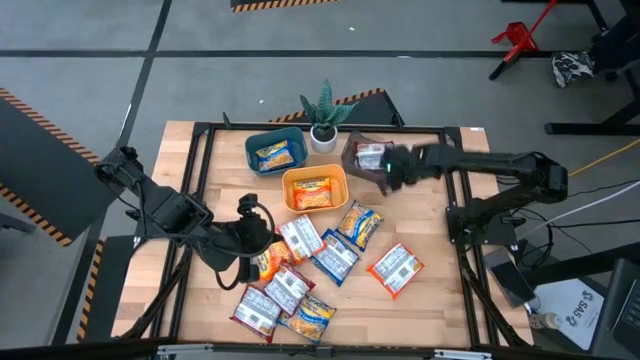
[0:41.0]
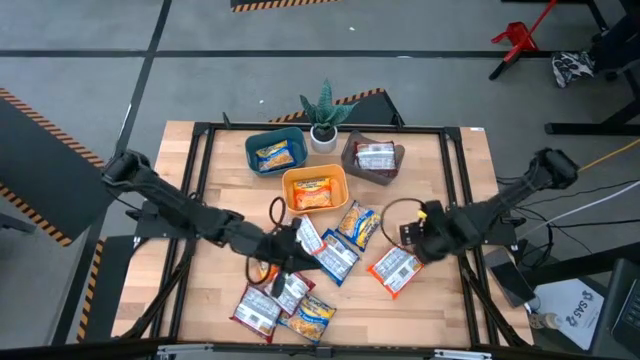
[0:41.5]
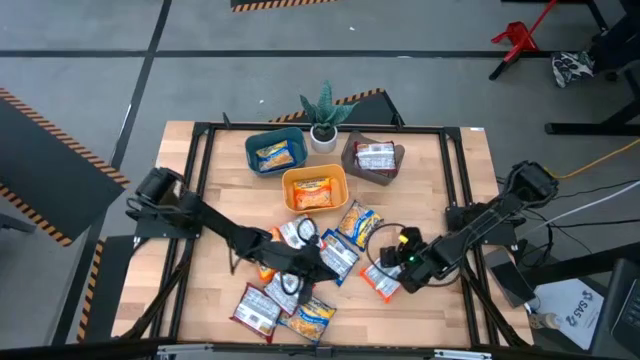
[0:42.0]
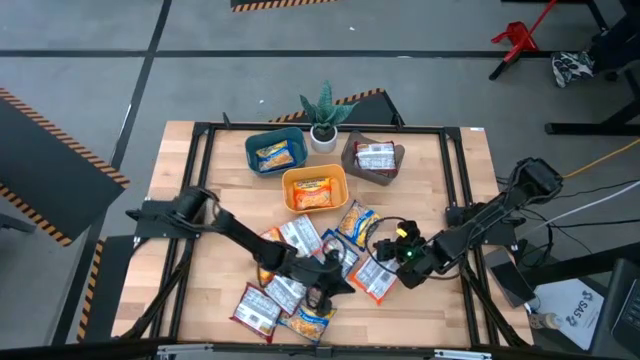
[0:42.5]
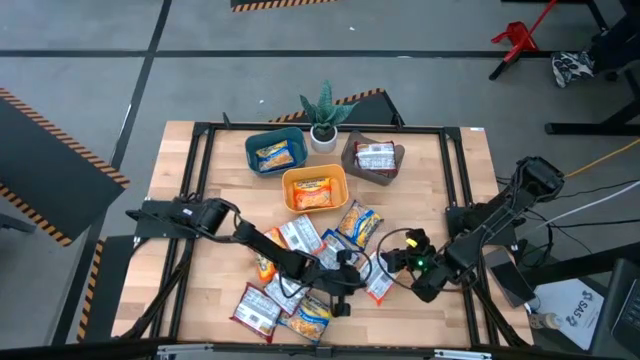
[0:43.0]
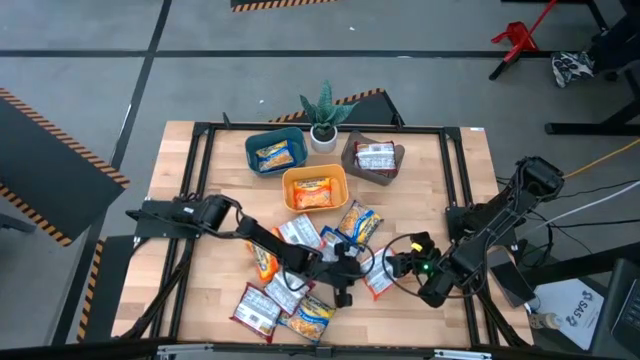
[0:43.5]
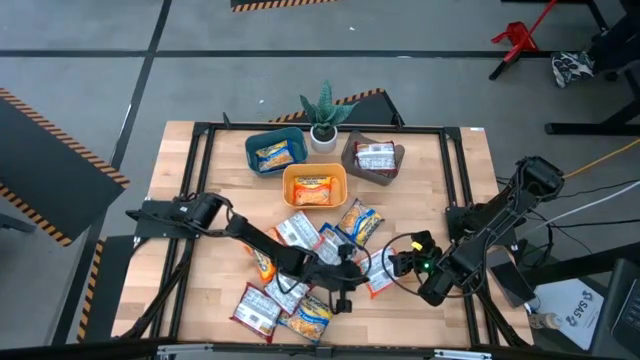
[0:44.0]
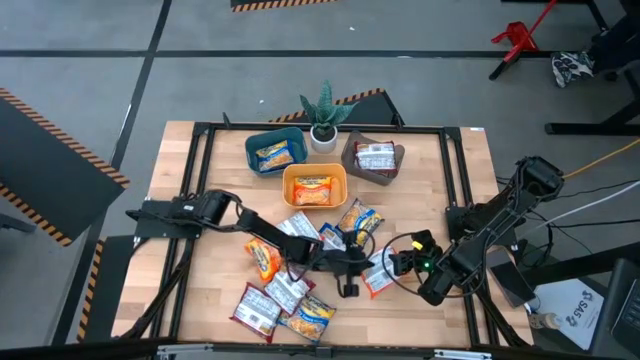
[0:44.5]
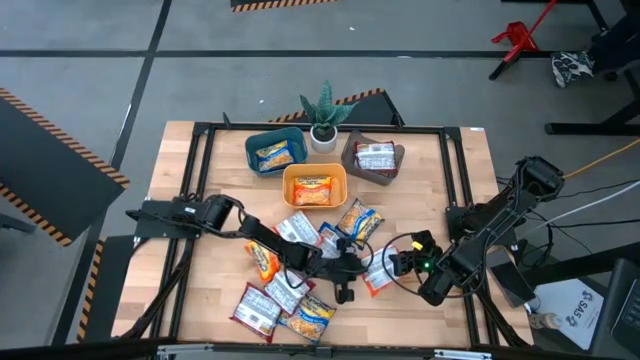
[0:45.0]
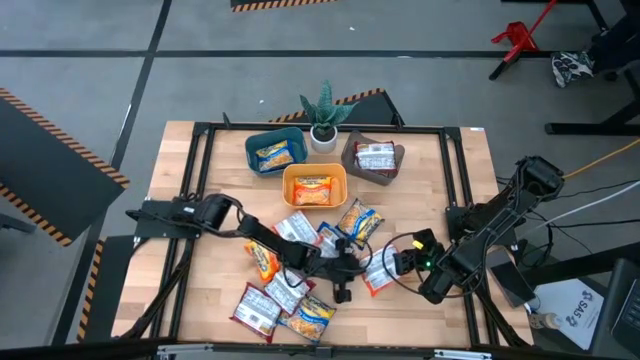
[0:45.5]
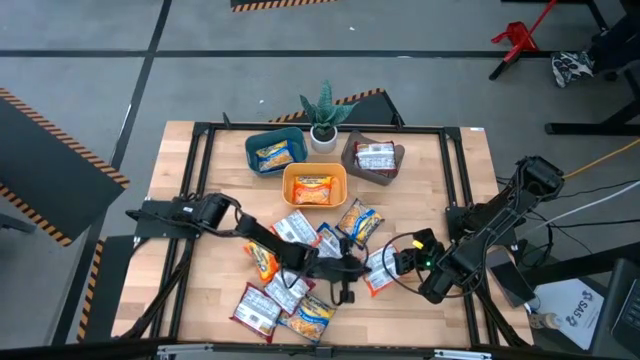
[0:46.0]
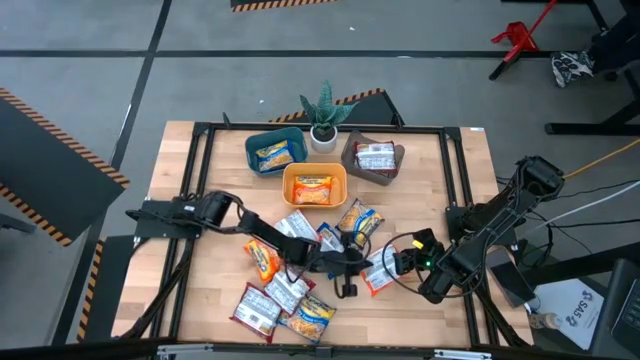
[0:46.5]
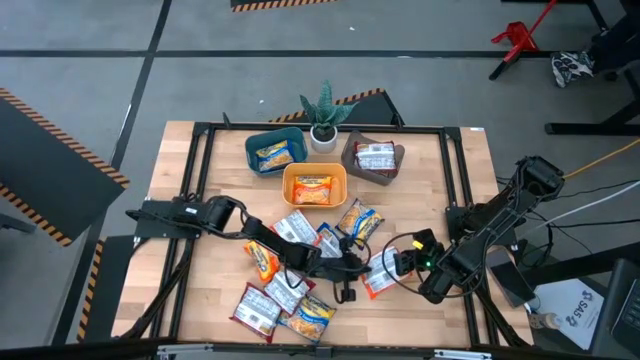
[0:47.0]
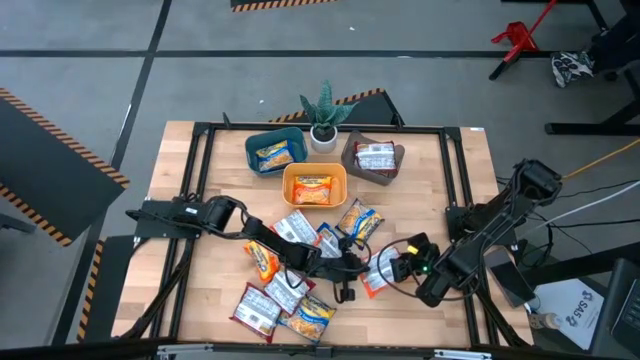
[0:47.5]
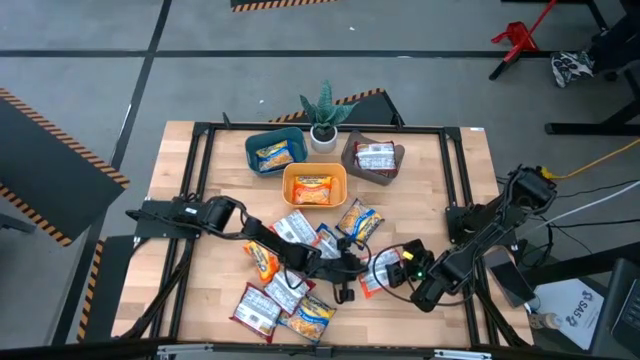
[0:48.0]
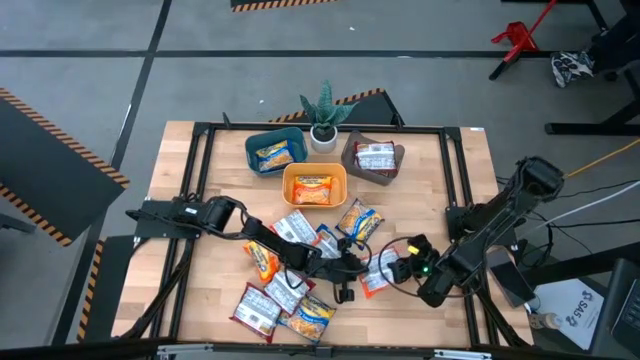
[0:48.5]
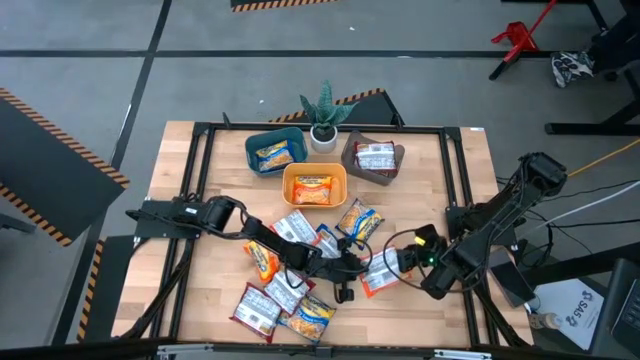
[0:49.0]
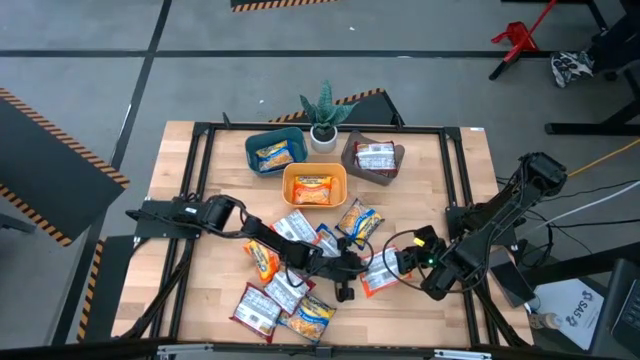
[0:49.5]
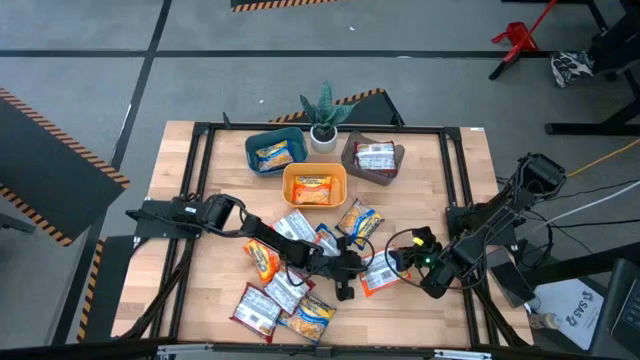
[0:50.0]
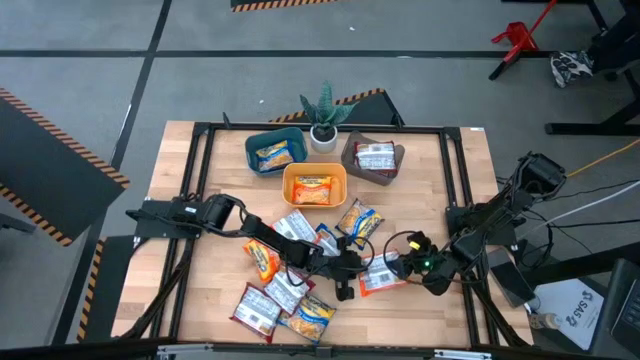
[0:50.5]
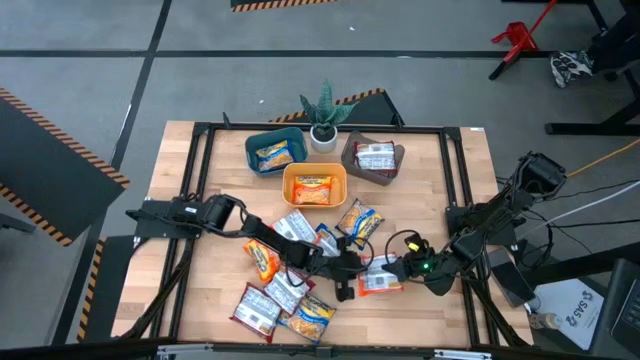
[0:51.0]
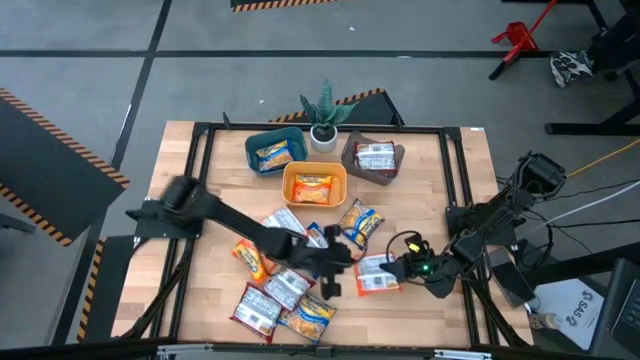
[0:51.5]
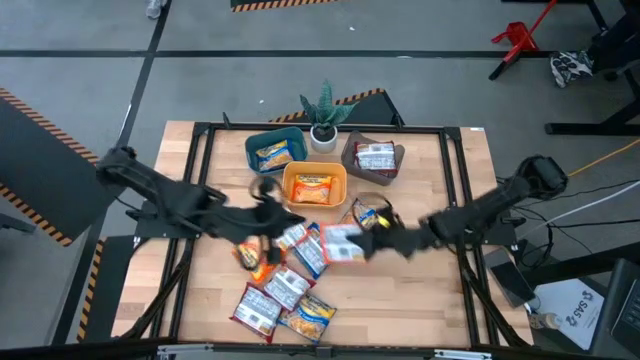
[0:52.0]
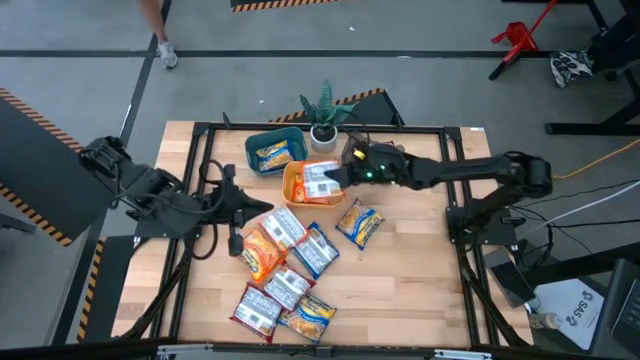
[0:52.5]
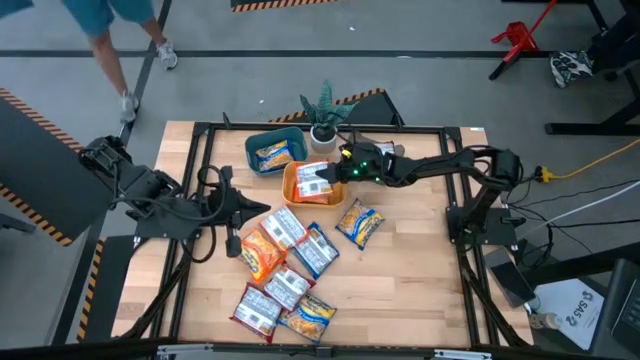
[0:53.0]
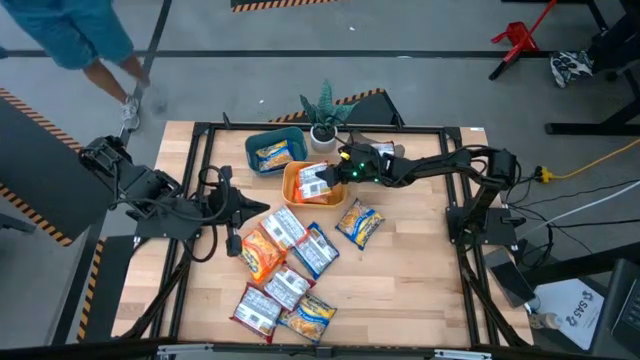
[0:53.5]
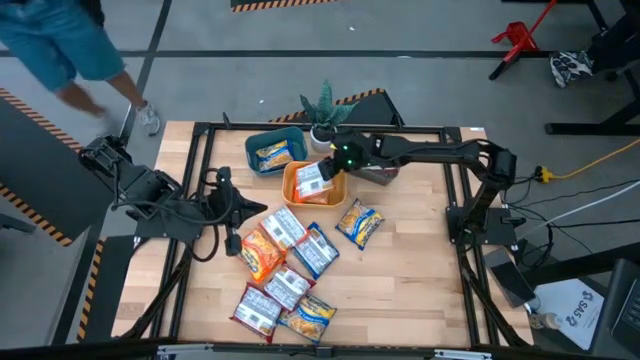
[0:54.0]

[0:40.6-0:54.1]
Task: Sort Maruchan noodles
Put the right orange noodle pack into the yellow bin

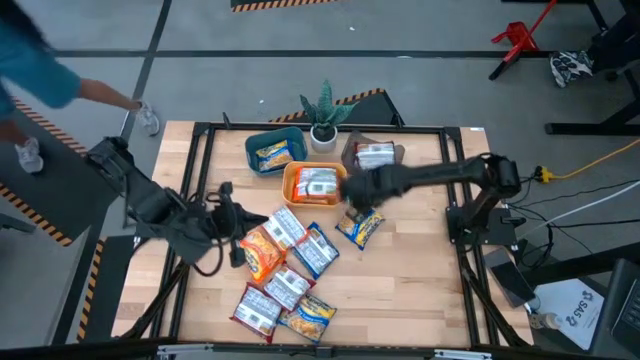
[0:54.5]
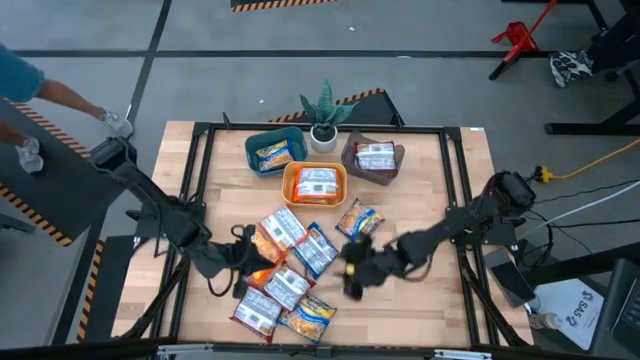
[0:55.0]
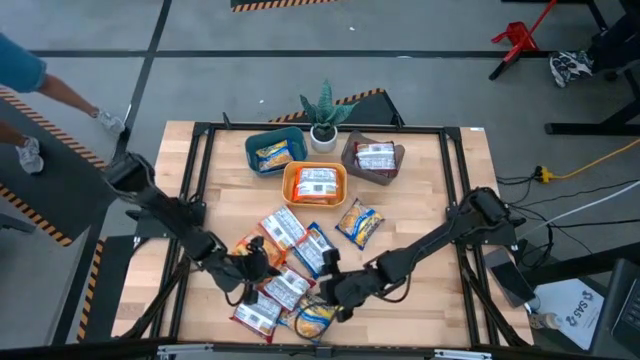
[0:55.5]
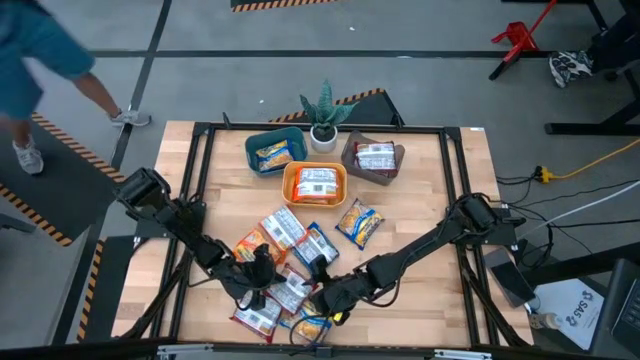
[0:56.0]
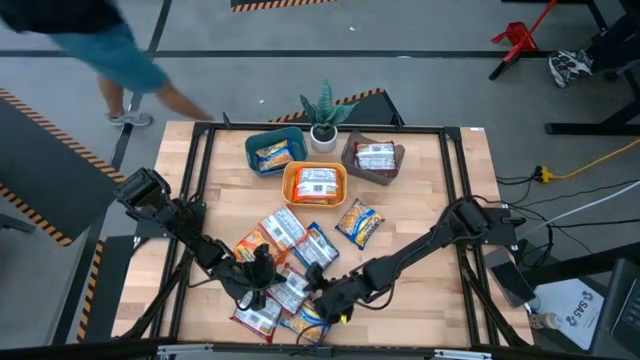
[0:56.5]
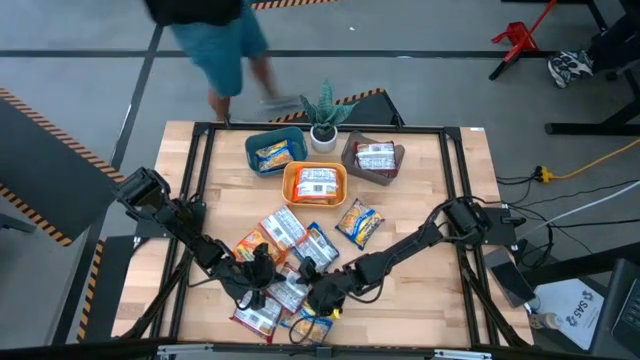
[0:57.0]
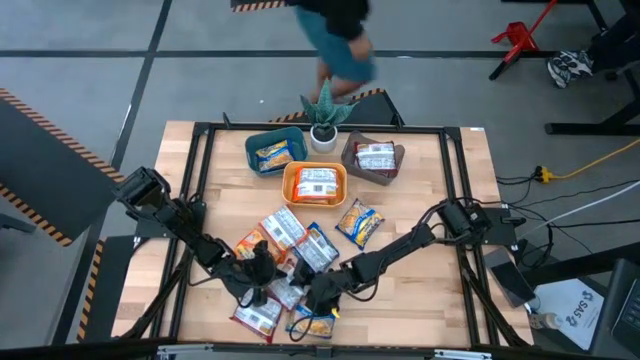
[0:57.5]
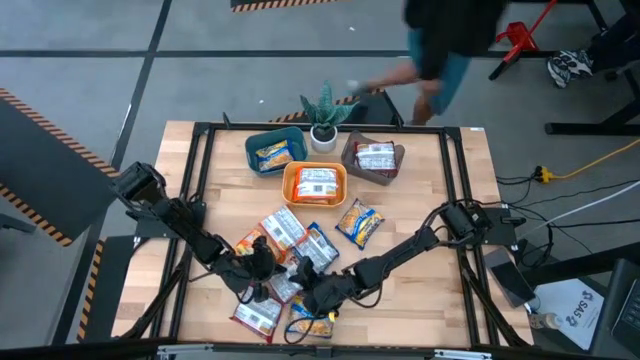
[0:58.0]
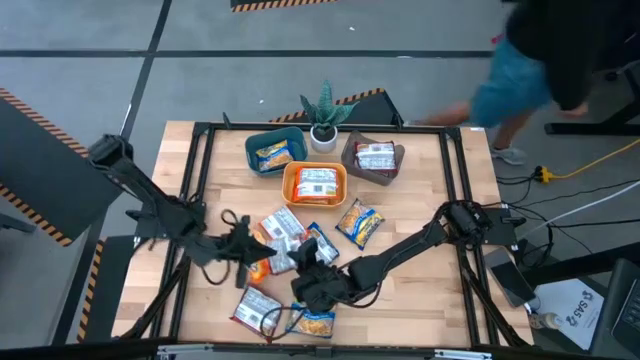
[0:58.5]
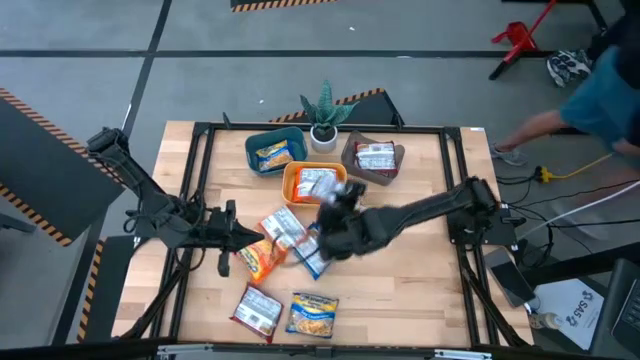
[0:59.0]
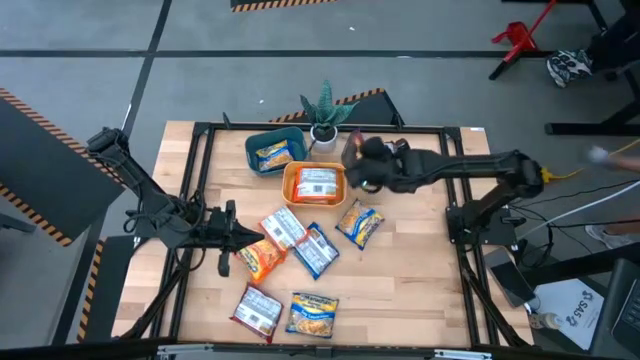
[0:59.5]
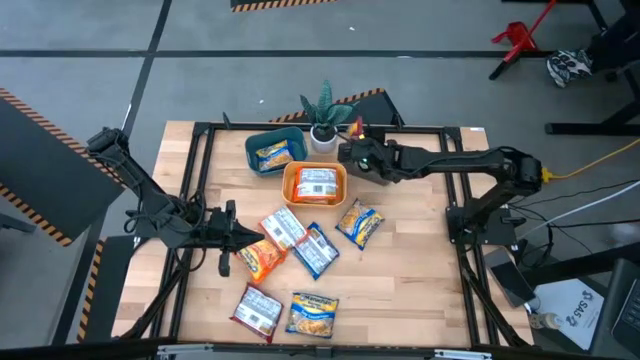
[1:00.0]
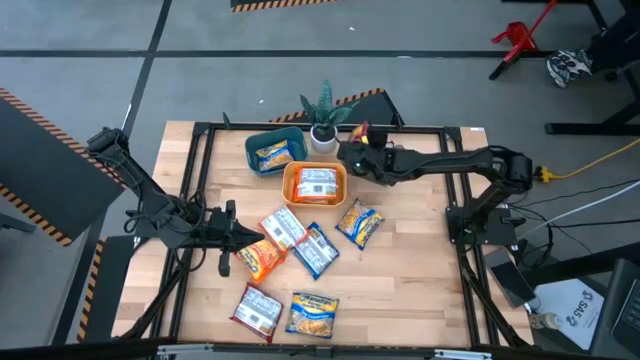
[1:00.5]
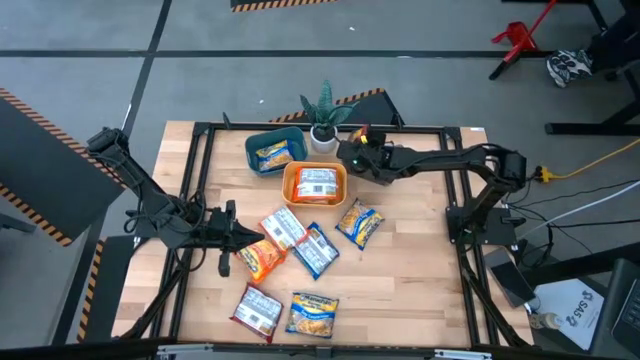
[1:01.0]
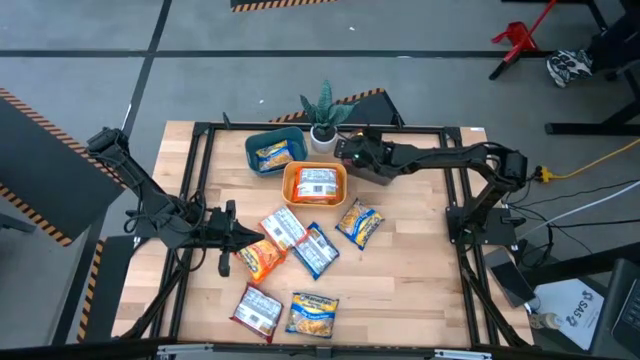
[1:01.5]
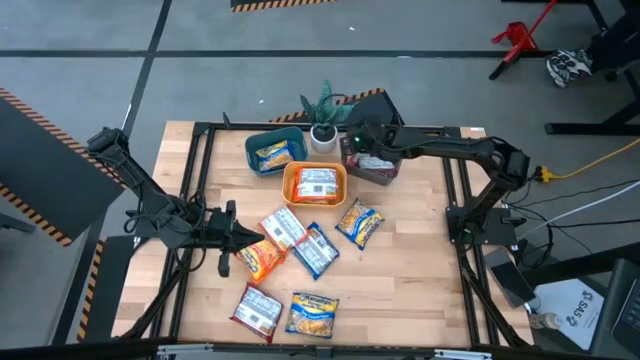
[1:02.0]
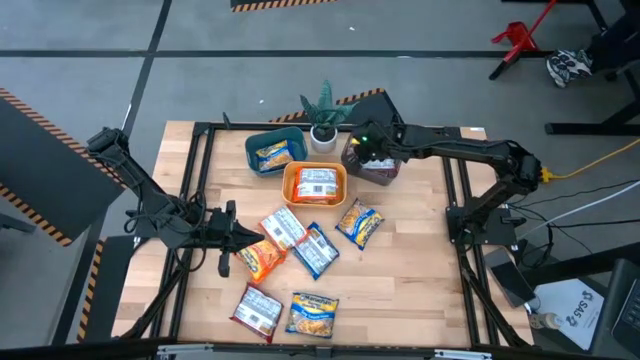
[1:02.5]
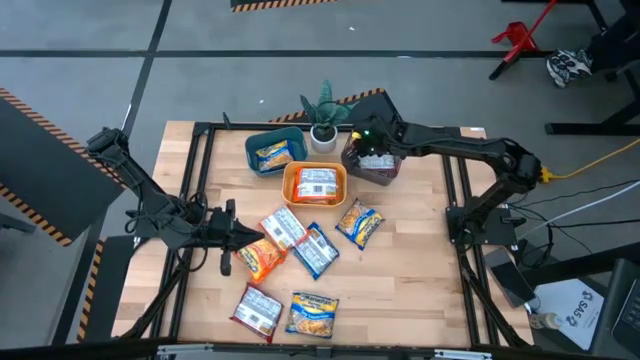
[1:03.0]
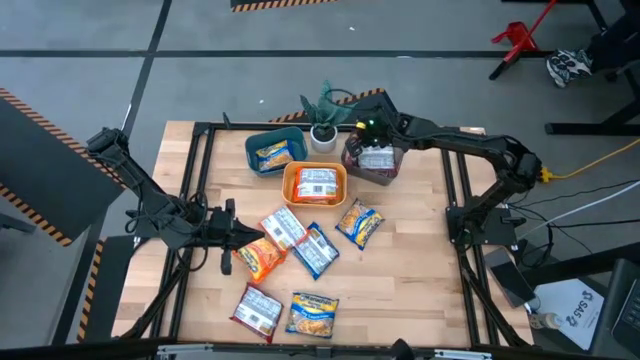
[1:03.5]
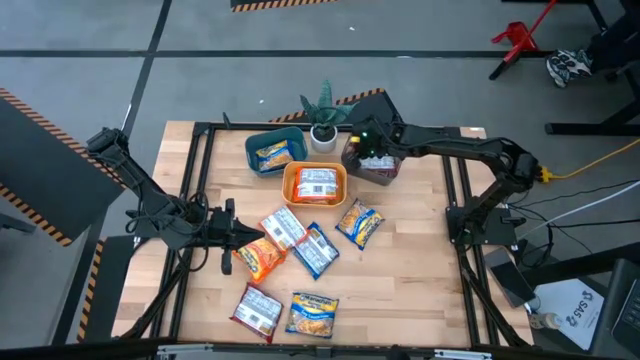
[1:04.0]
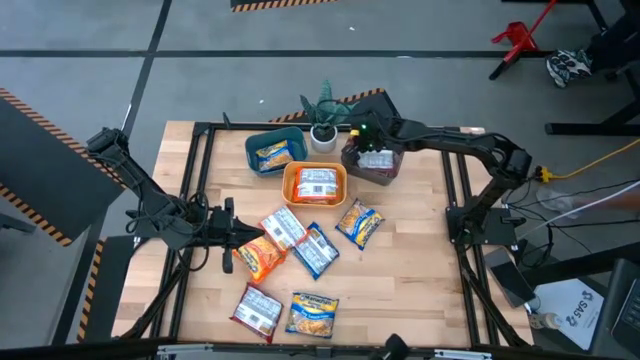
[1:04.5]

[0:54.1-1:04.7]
Put the top red noodle pack into the black bin
